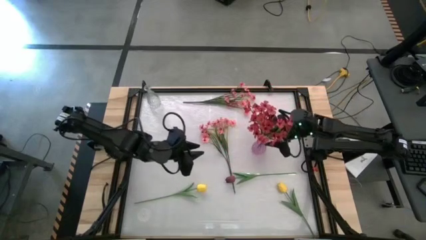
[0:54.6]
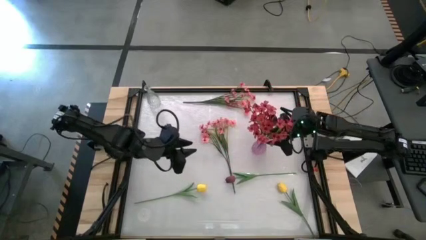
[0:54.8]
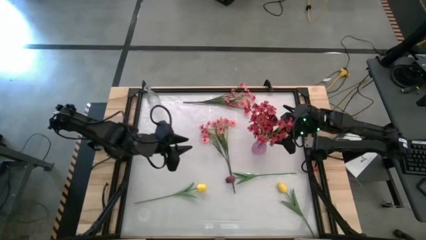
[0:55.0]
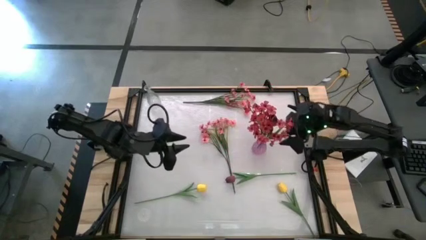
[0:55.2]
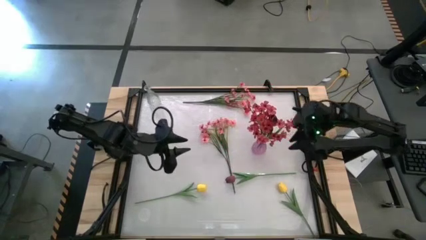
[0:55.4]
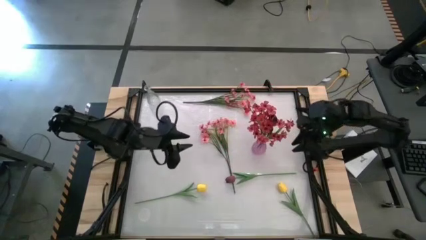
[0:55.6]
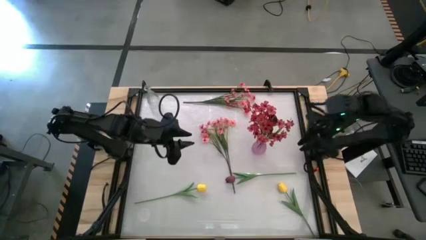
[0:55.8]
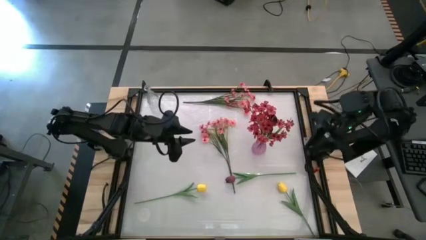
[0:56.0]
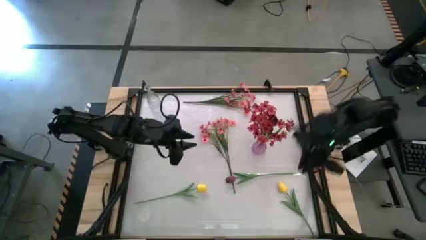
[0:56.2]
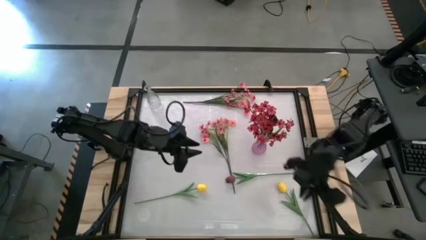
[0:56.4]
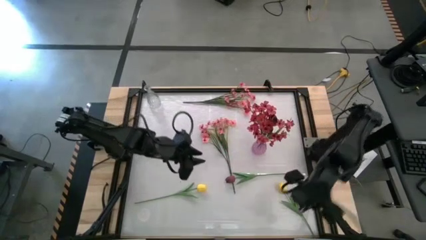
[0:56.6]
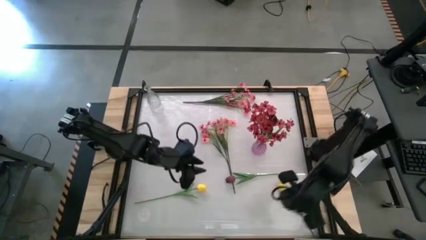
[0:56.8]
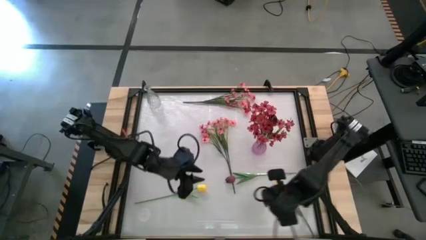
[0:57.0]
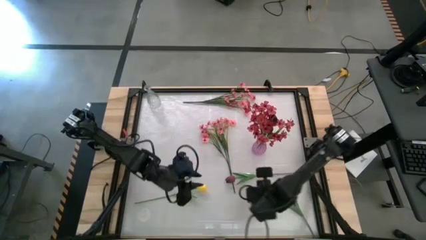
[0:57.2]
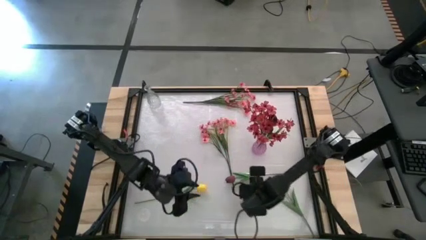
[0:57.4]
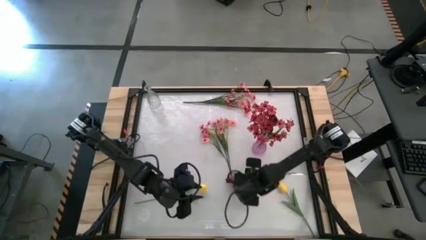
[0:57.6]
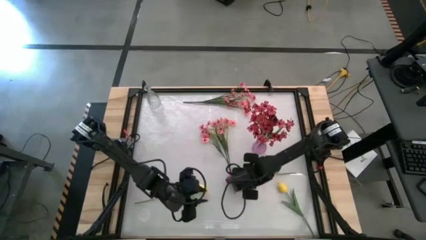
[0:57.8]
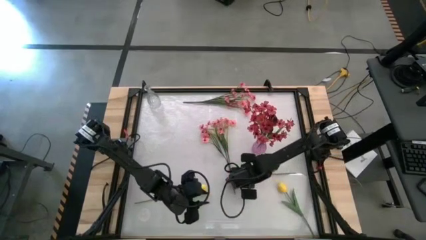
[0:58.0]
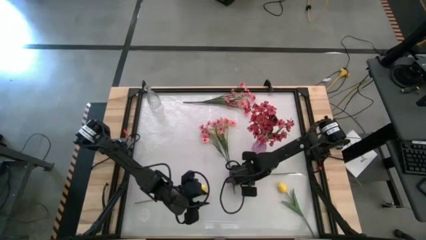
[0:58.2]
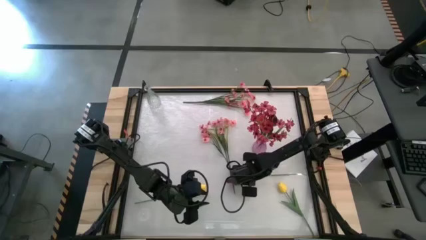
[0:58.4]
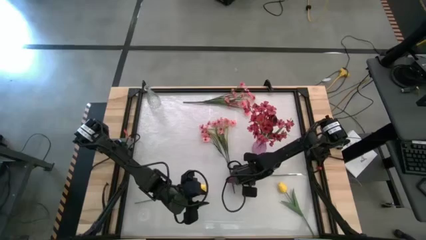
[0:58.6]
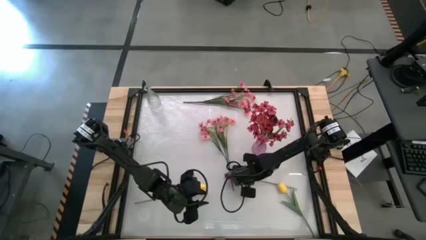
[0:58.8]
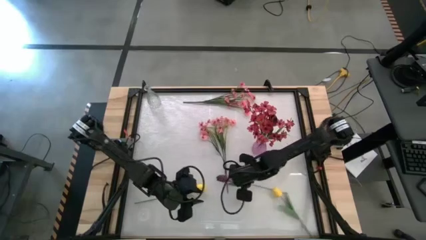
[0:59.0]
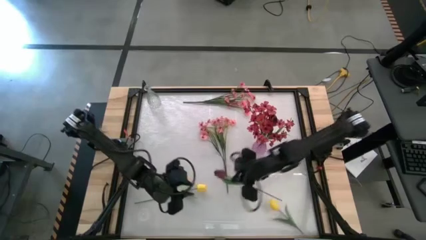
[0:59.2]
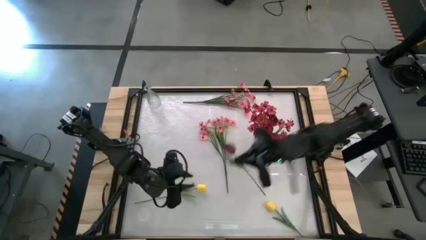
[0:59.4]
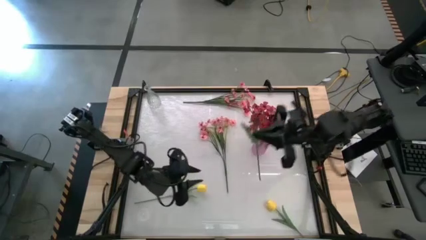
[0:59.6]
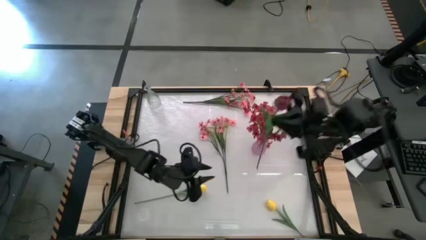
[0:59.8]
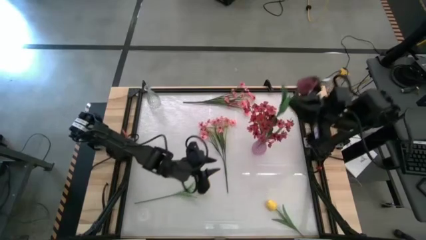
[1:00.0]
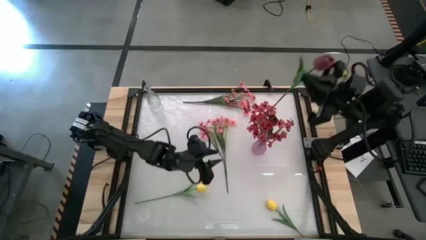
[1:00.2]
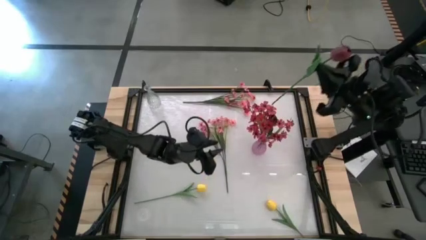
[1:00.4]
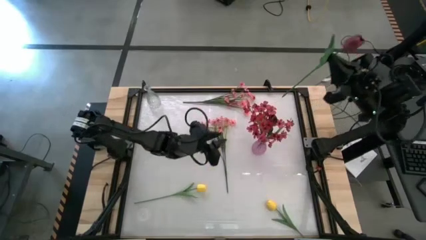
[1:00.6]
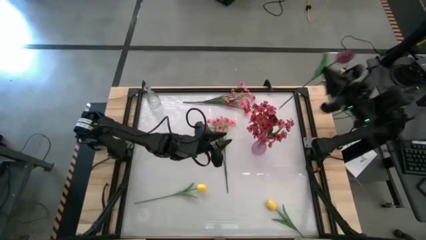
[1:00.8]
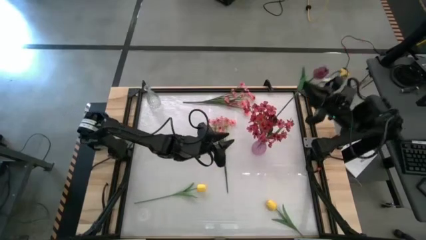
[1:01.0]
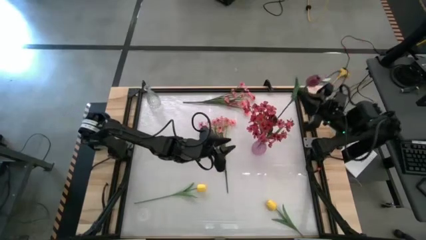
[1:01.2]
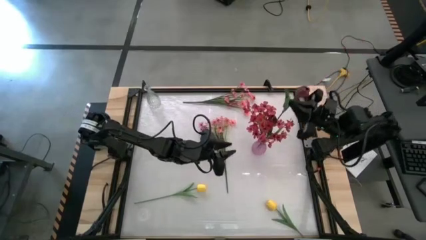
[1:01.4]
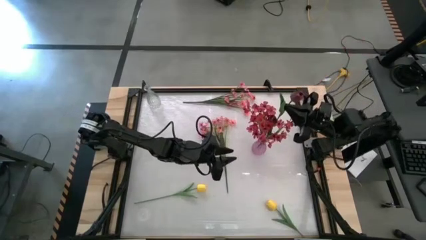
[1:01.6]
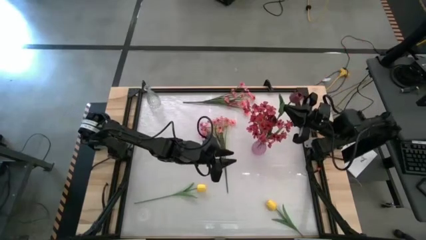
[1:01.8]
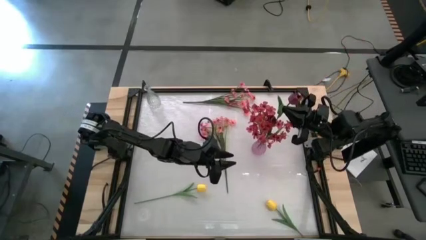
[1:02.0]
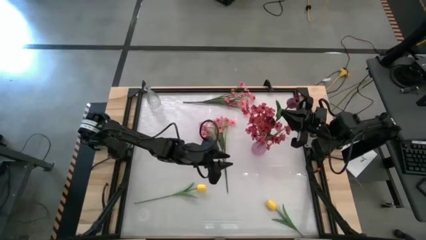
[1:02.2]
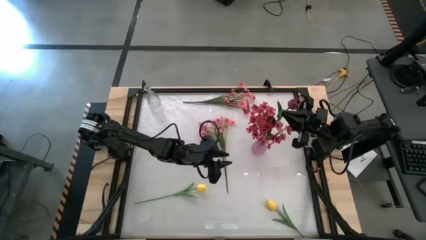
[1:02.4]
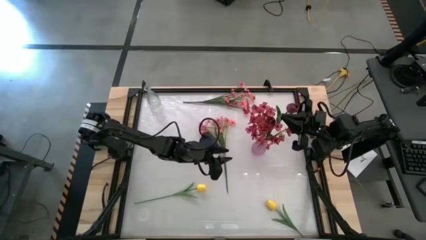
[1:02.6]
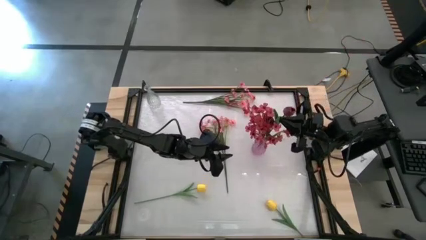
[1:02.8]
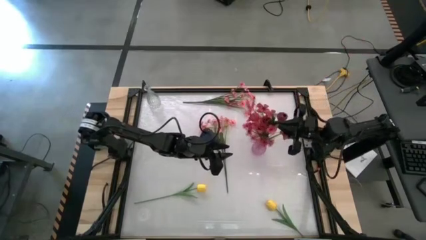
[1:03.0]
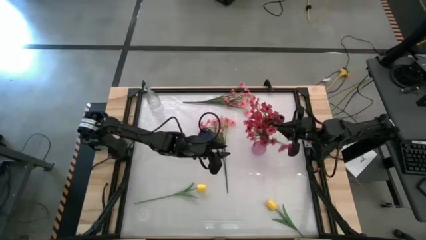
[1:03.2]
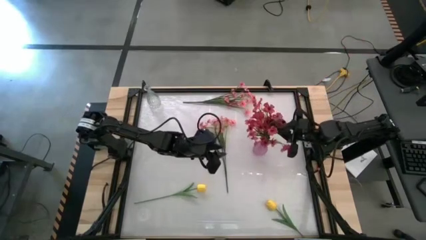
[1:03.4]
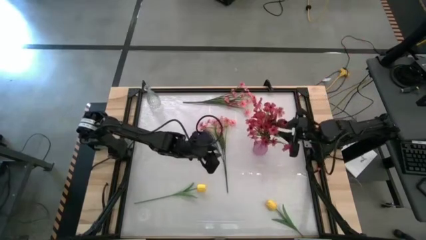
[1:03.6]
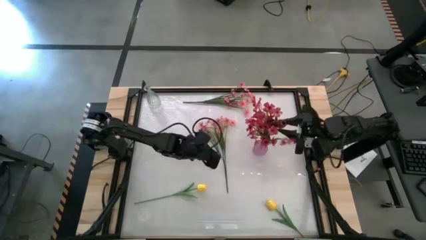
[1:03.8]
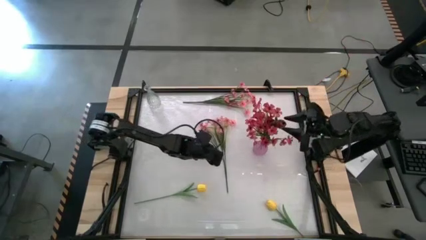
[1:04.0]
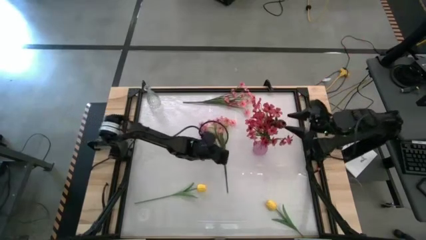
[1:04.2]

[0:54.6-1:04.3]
Task: Sort flowers into vase by color
Put the red tulip into the pink vase

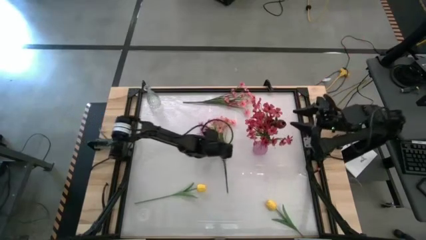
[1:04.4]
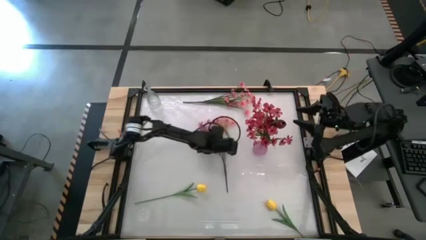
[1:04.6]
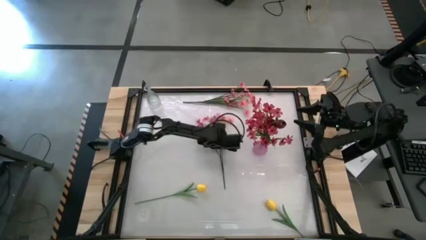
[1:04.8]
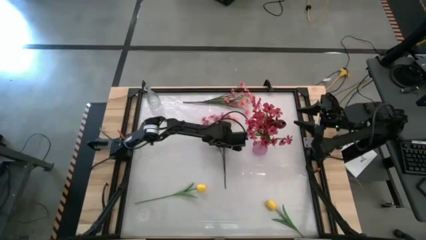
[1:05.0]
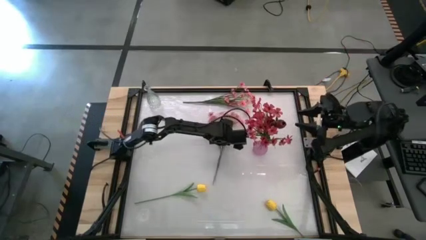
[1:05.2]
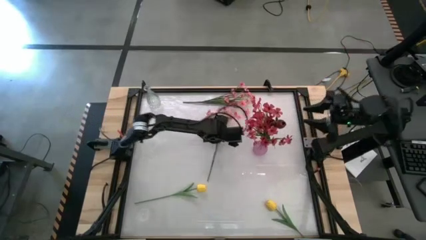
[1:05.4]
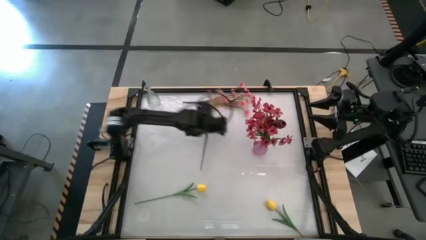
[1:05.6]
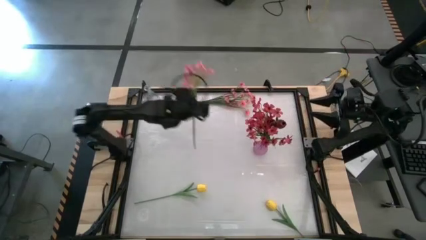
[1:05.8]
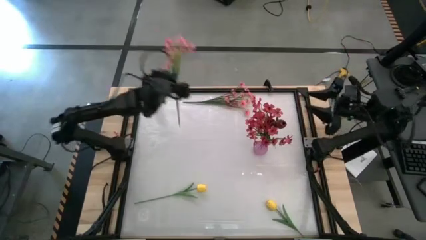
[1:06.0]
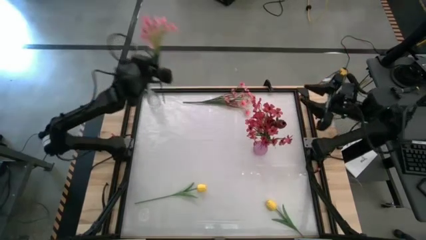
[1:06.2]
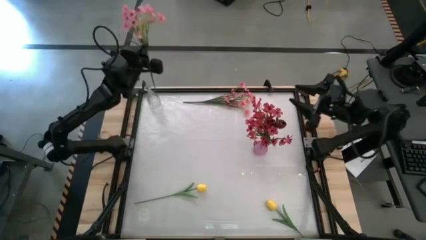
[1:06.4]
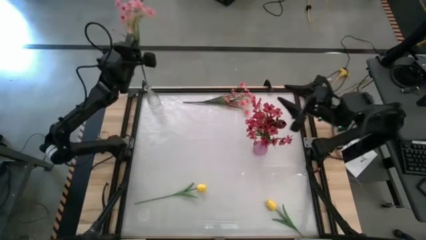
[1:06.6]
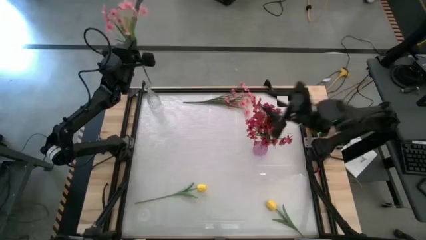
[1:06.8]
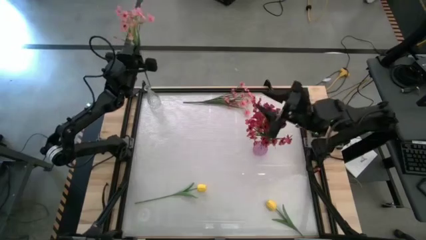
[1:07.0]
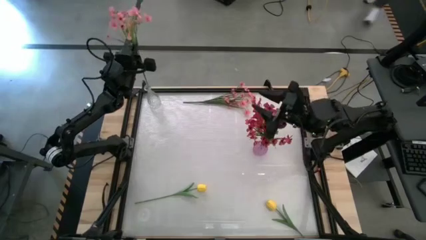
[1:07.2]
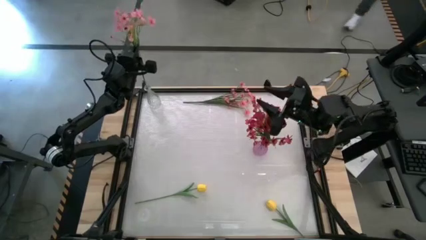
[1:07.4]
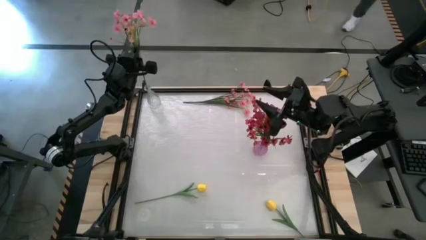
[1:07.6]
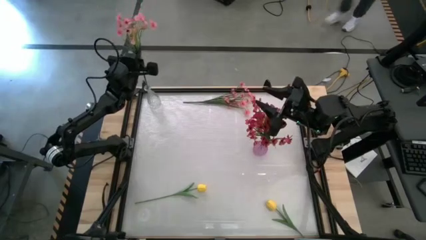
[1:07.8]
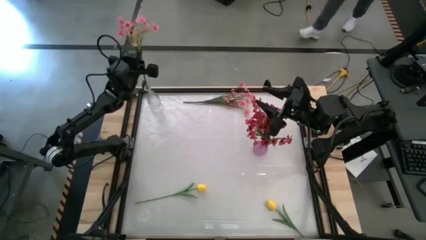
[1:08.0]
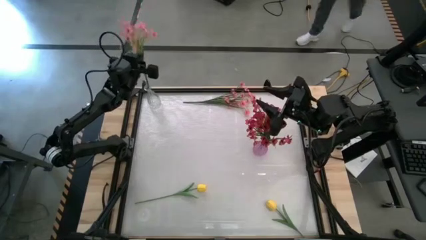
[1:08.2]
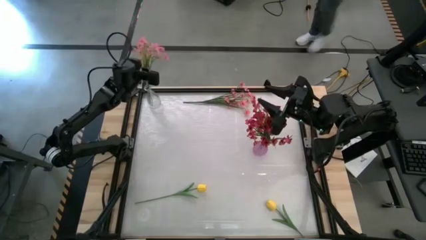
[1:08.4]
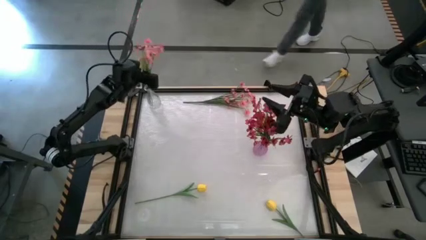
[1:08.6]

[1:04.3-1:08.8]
Put the bottom pink flowers into the transparent vase
